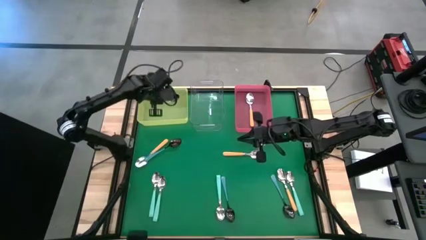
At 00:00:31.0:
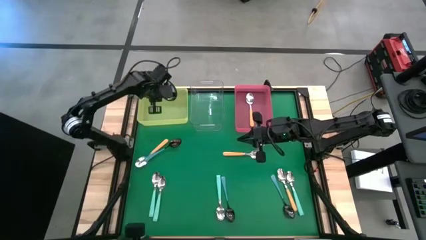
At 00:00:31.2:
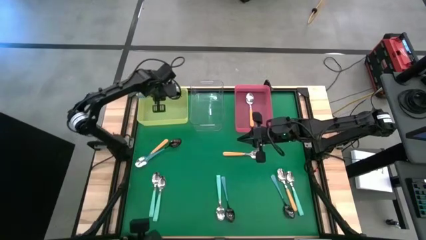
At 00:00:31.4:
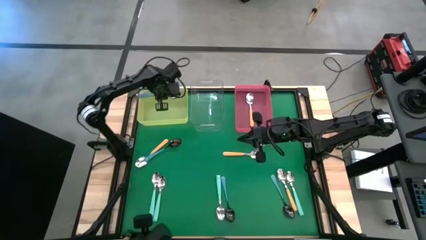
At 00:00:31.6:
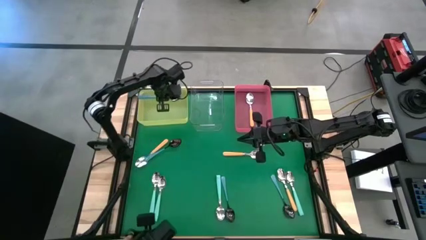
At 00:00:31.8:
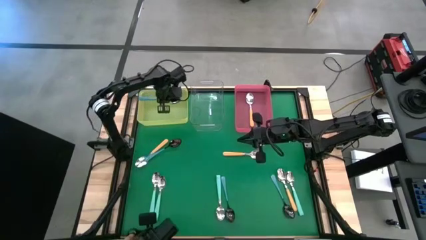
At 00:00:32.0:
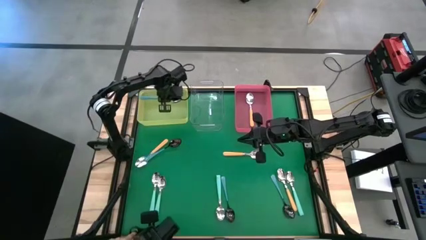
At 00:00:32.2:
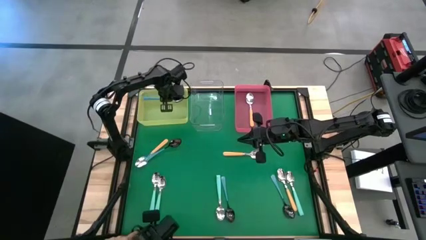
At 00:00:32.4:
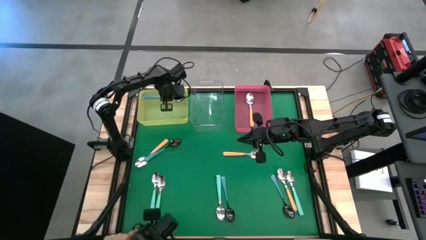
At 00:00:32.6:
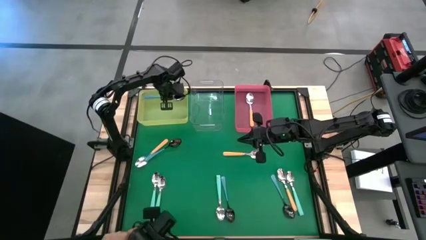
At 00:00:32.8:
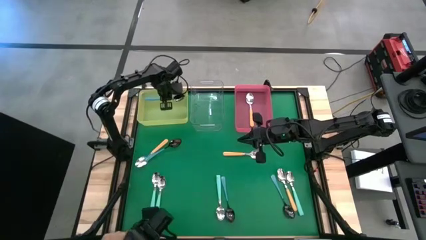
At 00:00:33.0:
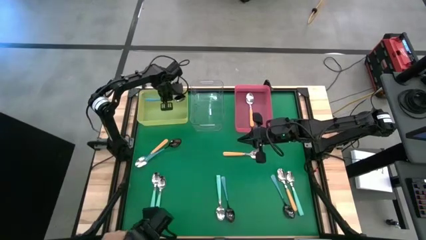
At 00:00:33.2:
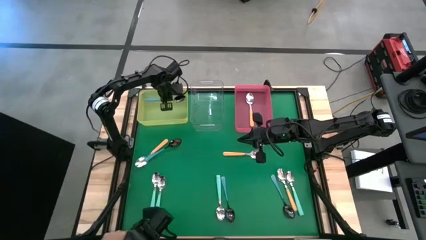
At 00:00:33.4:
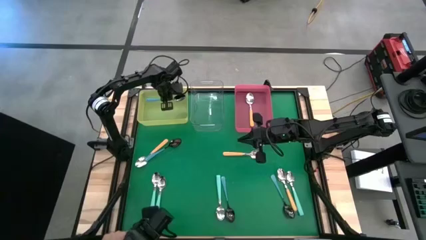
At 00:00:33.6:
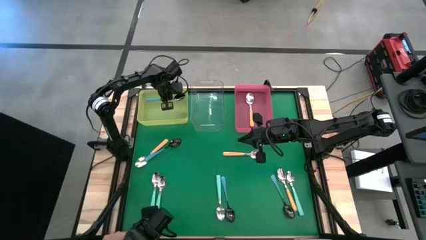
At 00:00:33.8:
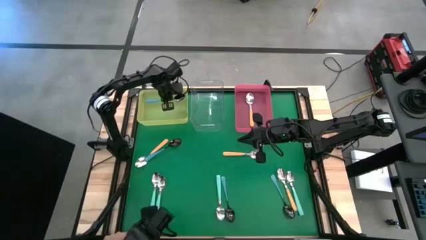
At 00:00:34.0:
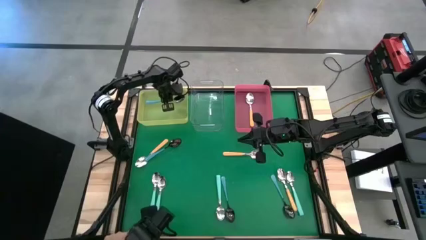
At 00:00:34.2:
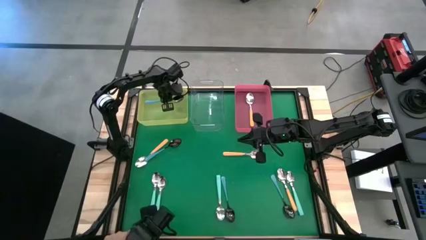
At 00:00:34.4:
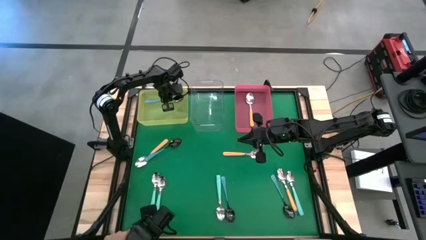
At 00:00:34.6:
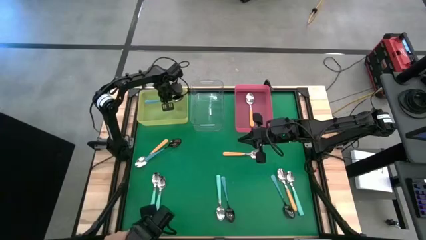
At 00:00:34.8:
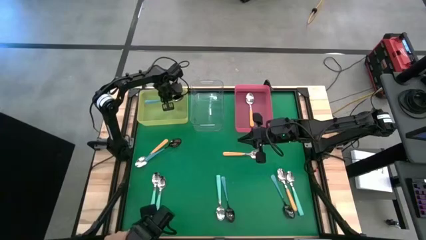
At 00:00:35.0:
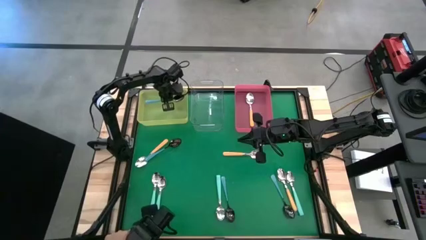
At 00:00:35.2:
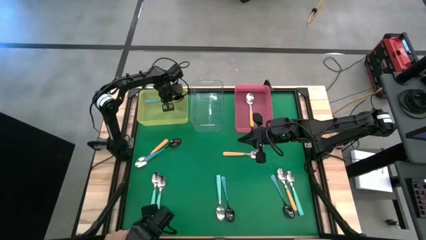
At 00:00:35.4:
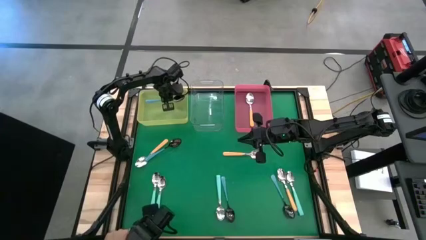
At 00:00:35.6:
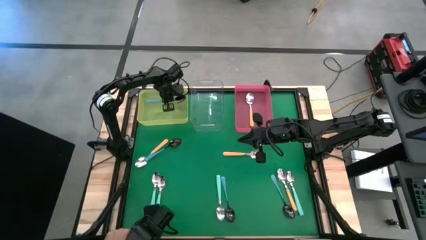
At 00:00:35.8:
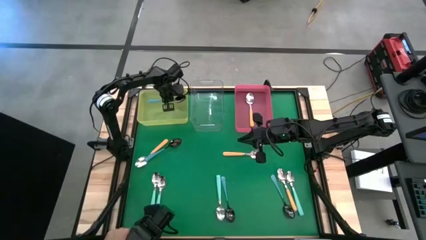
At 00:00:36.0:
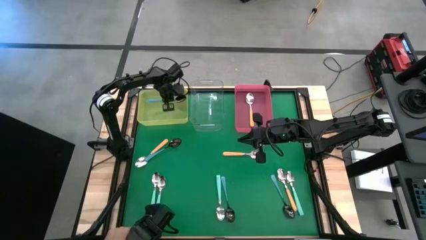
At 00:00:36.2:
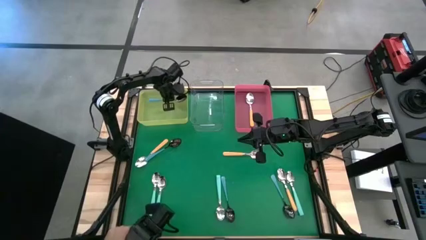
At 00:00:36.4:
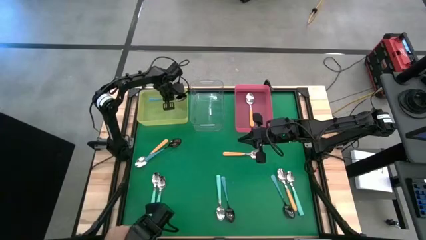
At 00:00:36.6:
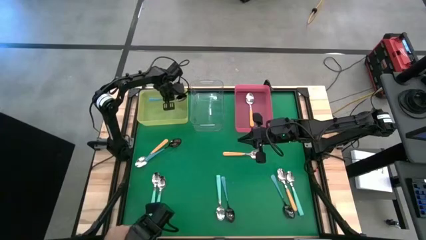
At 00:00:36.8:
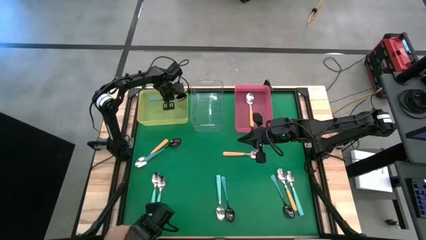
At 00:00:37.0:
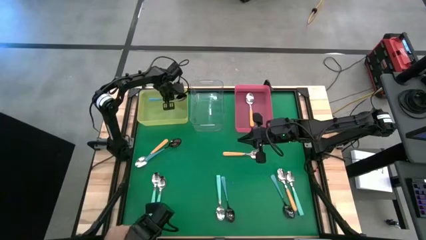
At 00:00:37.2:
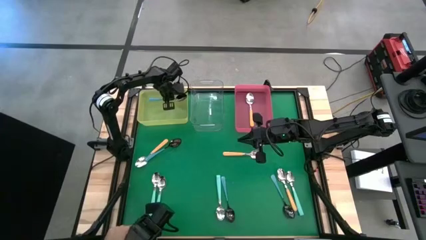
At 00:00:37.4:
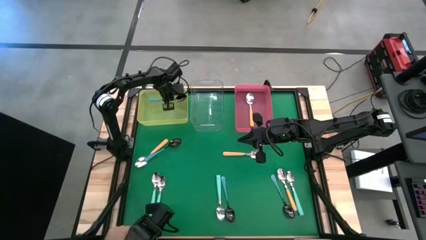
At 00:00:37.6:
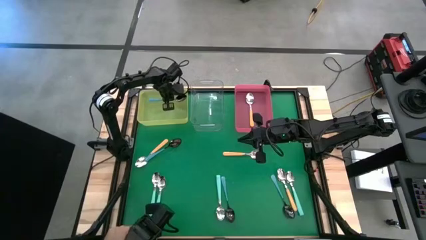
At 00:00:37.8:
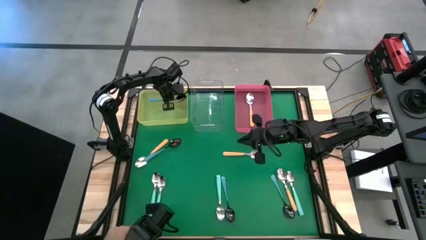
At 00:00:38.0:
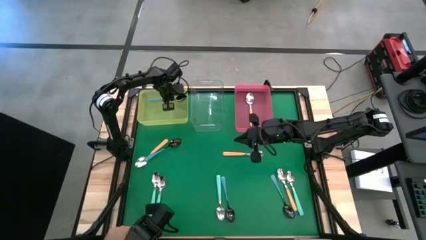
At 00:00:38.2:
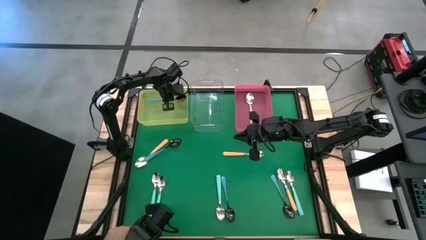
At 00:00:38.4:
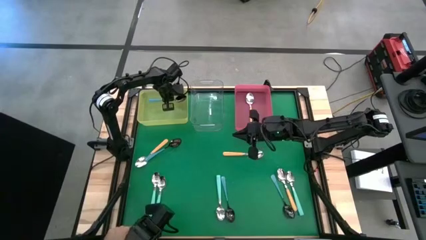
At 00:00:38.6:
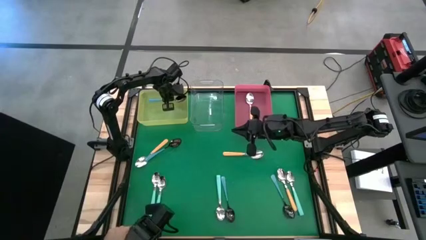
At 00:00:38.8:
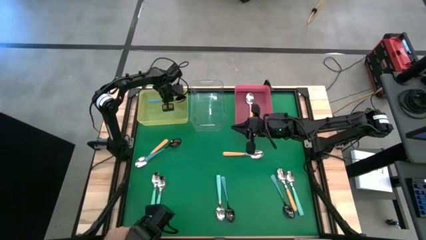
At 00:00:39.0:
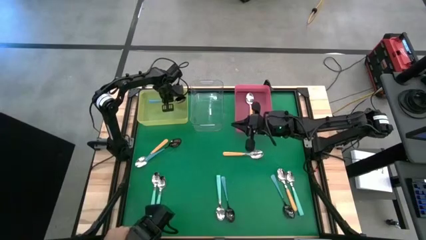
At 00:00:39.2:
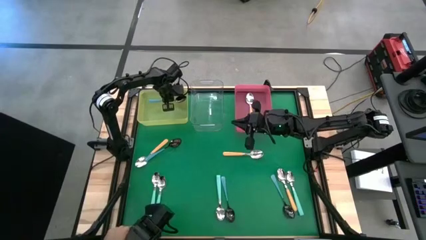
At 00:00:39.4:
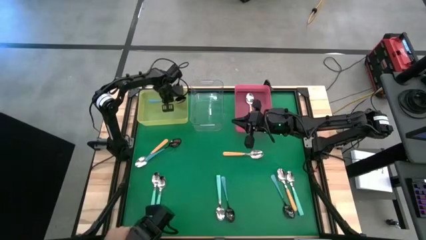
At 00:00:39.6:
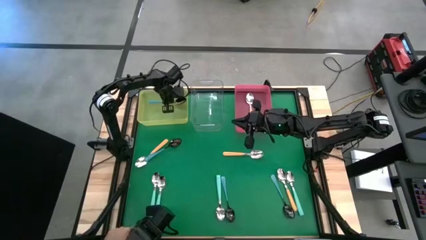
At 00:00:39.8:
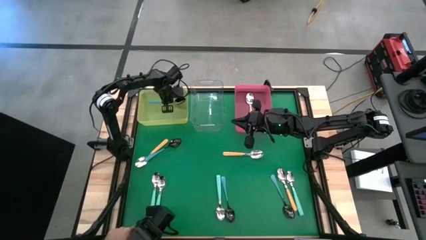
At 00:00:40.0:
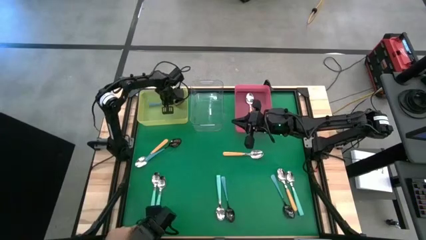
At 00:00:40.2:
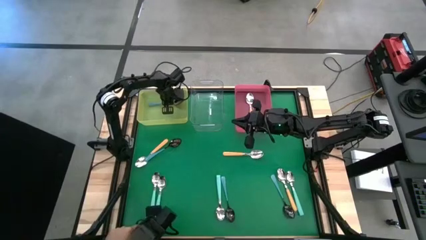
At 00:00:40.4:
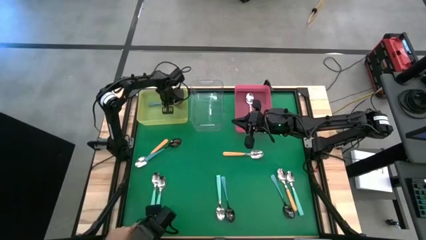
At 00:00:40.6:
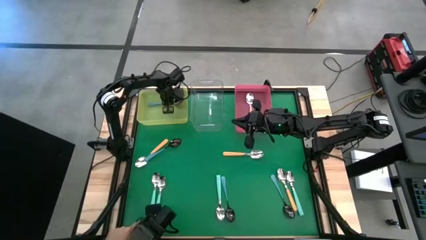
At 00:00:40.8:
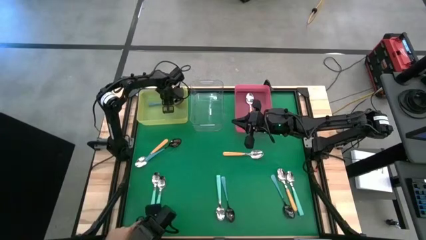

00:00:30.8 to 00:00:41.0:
Task: Sort silverware by color (type)
Put the blue spoon into the yellow bin
